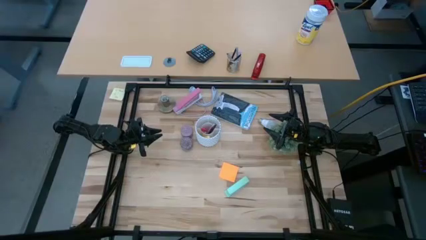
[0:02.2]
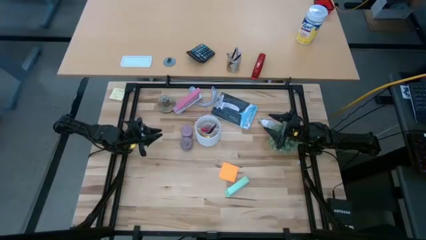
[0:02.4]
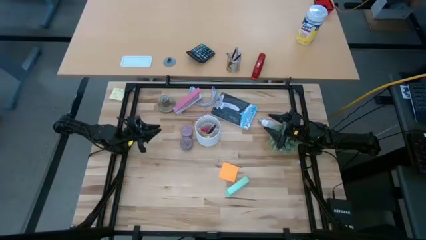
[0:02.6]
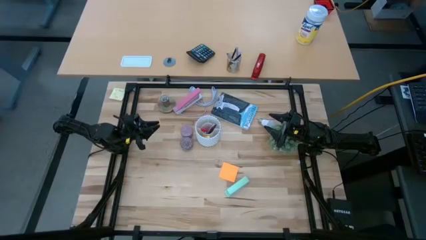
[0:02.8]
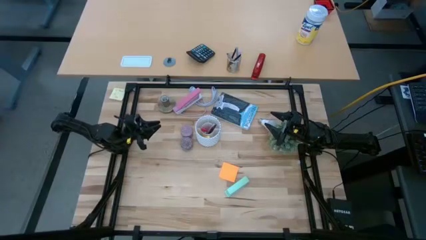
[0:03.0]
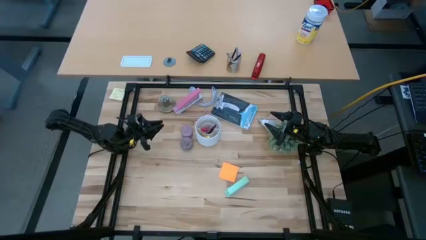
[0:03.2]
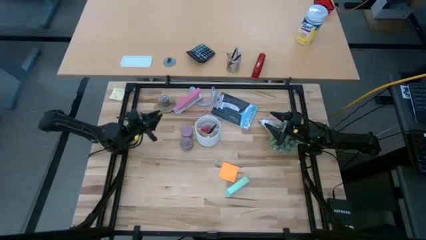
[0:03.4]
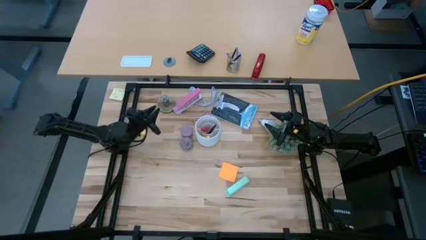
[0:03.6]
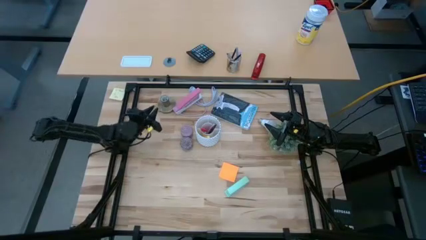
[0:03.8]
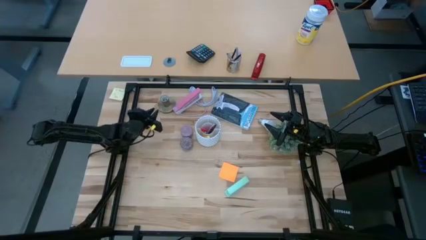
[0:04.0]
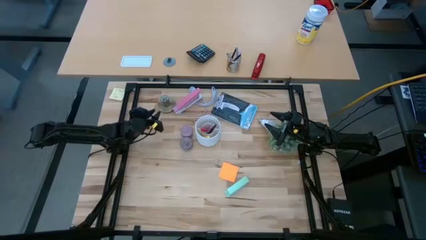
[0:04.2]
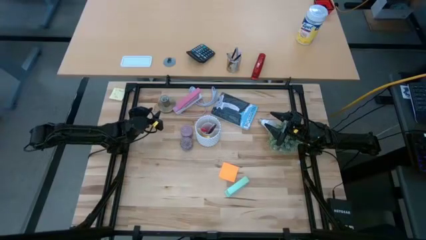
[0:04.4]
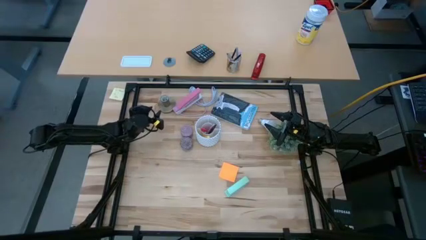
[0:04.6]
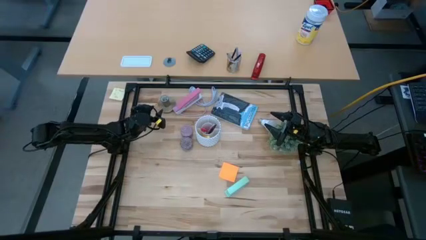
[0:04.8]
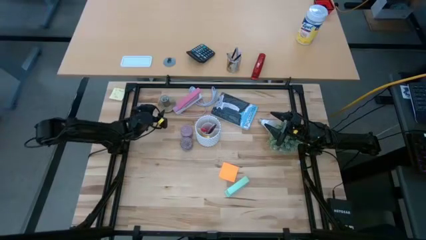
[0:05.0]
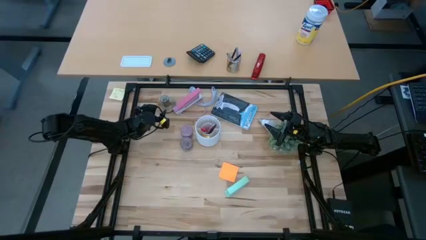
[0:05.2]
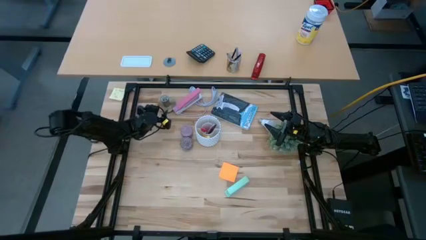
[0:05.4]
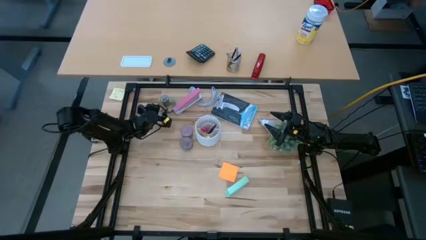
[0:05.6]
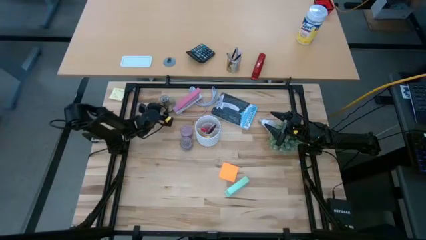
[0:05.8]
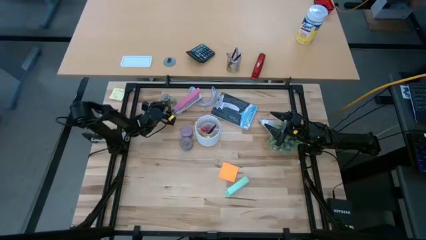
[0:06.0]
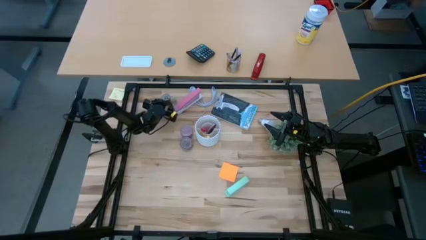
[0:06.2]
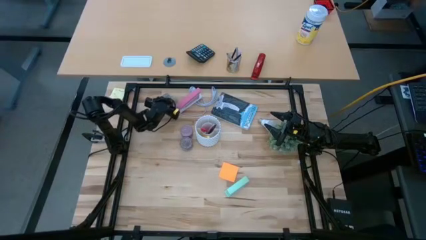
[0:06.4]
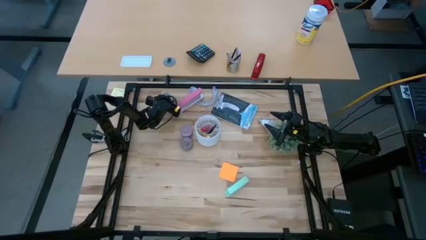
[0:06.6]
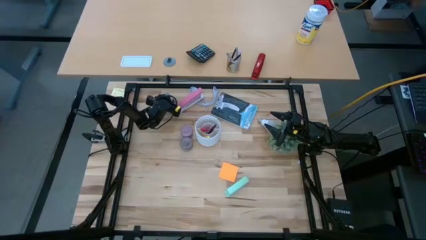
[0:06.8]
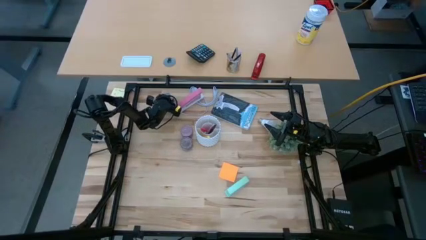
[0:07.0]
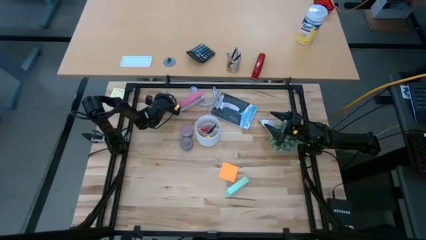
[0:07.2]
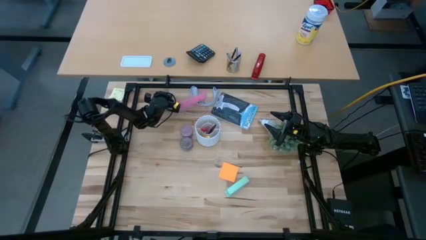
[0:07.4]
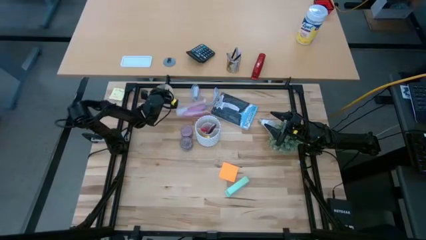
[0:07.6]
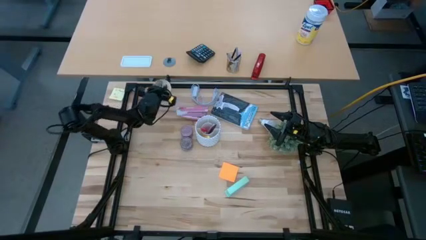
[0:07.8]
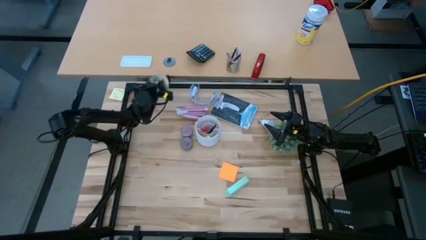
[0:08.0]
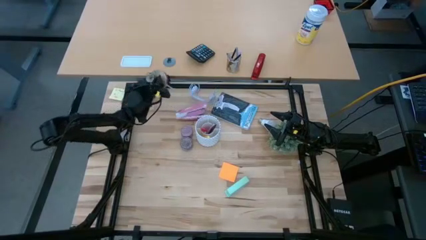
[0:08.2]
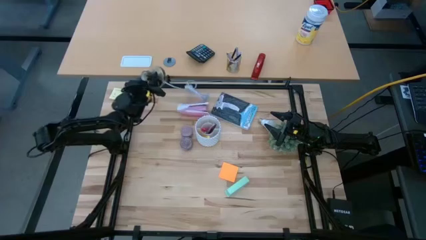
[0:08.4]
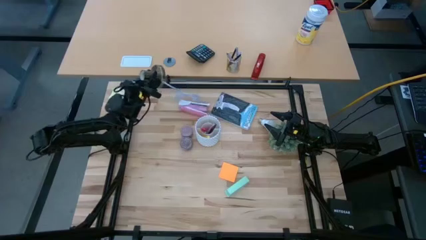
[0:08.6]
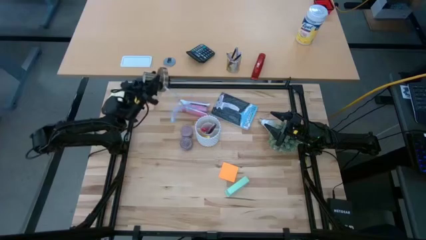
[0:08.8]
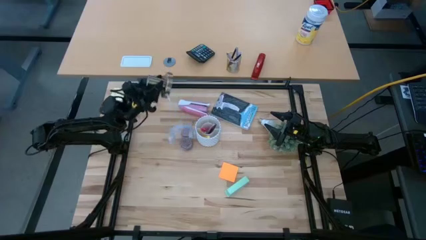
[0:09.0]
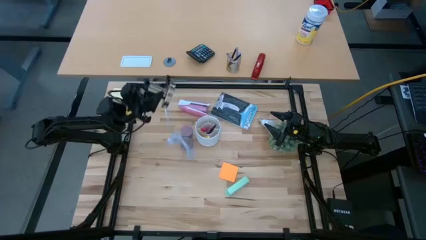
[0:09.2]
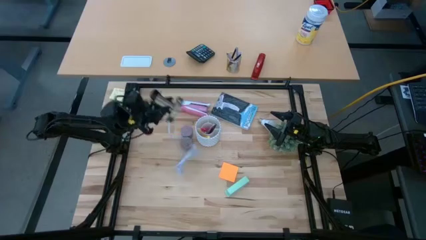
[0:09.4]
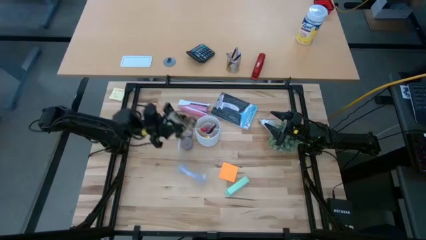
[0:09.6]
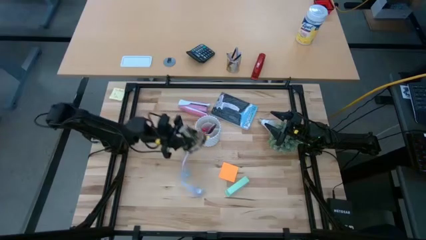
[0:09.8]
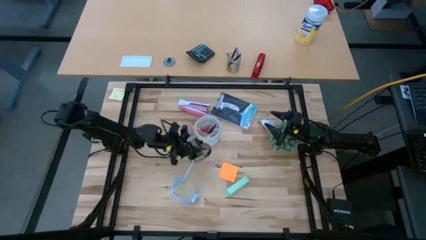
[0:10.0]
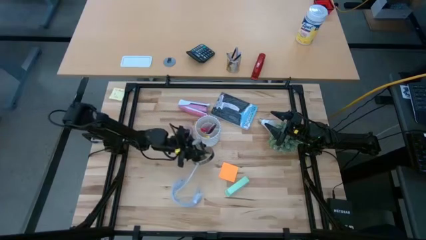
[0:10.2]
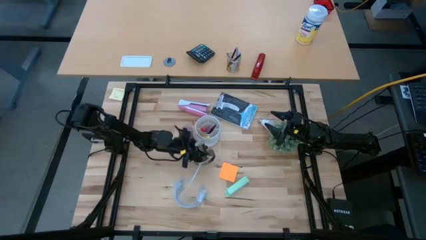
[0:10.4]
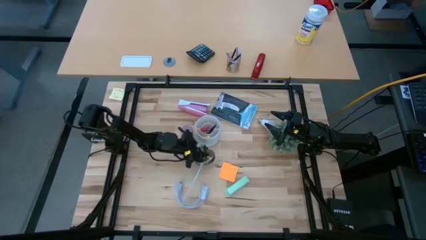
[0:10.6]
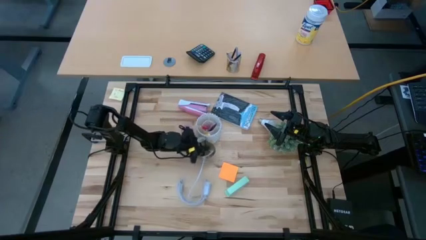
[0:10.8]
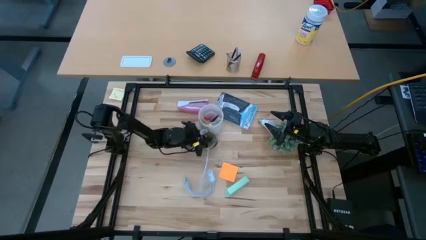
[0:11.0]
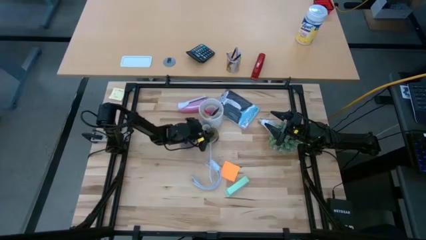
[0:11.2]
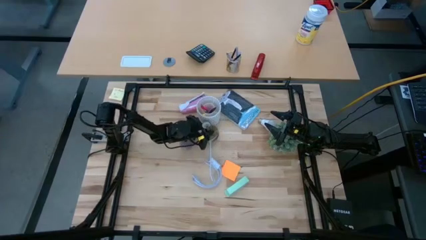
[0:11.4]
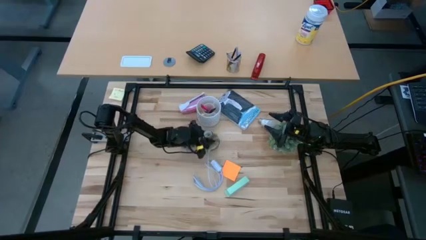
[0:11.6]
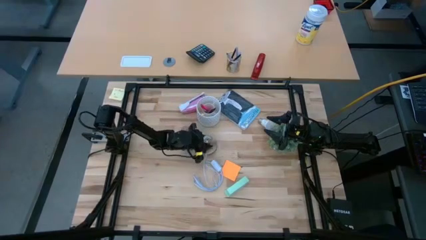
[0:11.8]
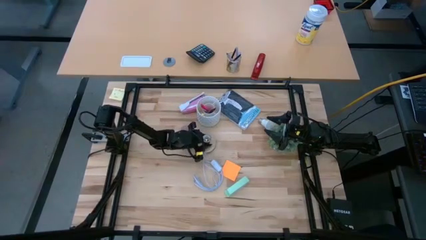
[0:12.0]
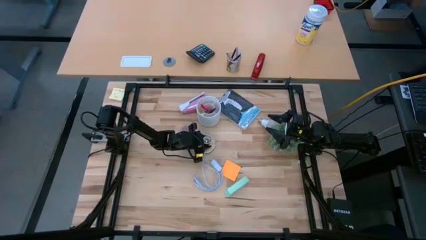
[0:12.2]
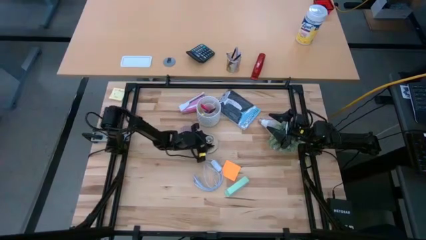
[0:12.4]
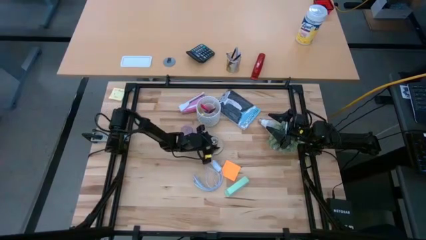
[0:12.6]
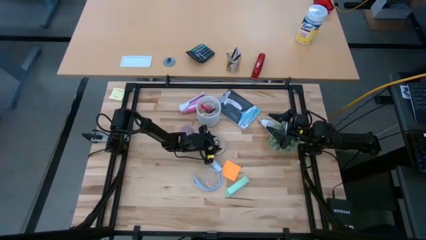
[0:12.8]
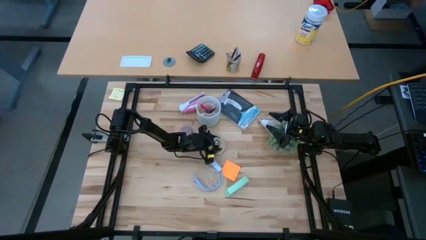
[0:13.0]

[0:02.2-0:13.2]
Task: Screw lightbulb
Move the lamp to the center of the table

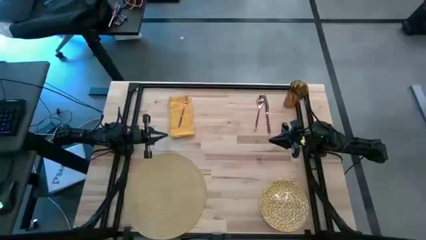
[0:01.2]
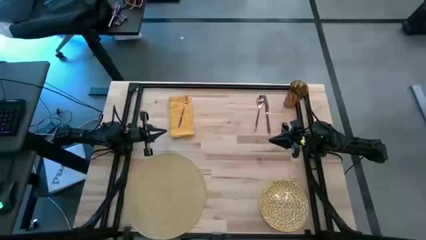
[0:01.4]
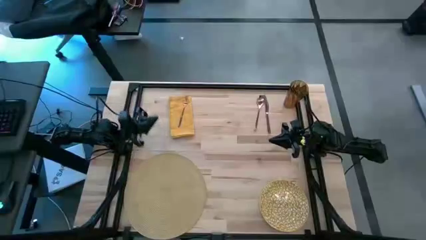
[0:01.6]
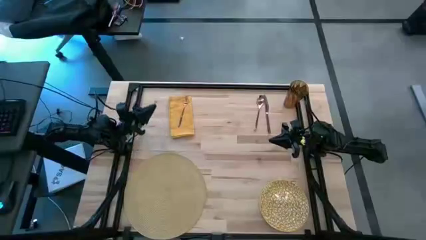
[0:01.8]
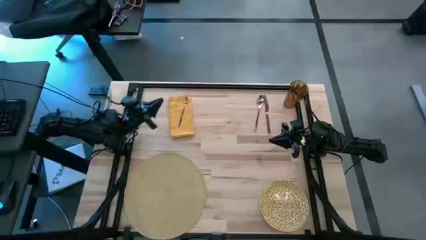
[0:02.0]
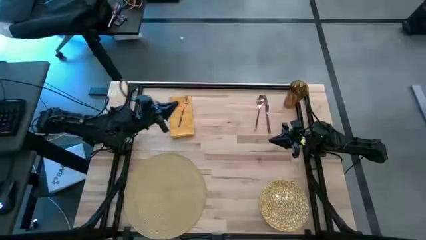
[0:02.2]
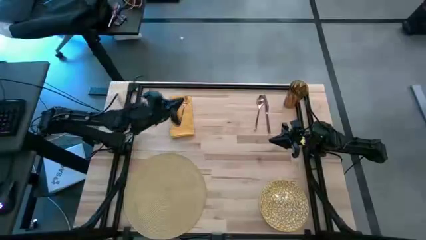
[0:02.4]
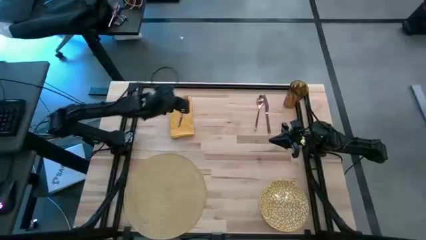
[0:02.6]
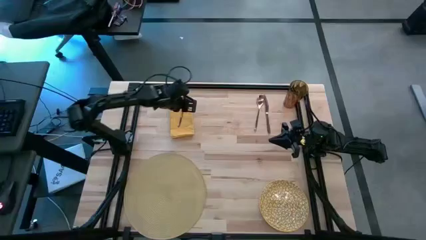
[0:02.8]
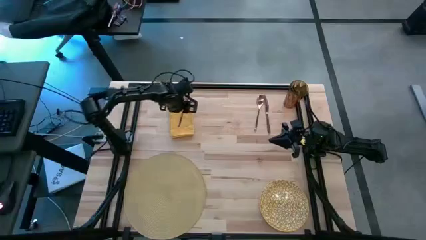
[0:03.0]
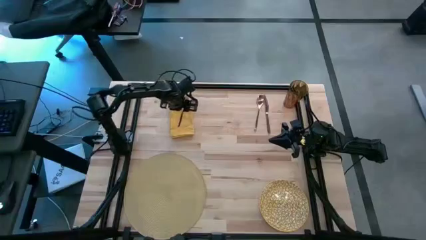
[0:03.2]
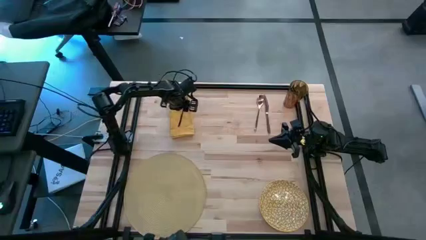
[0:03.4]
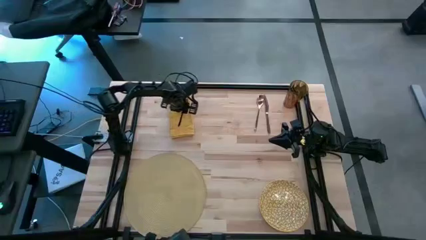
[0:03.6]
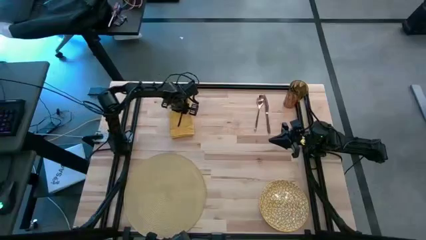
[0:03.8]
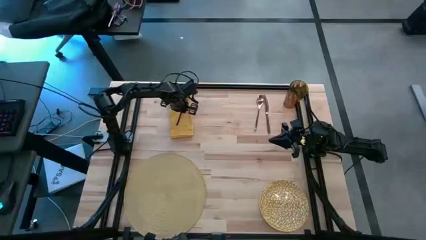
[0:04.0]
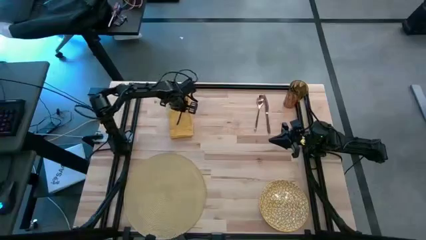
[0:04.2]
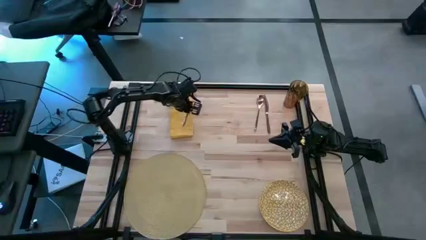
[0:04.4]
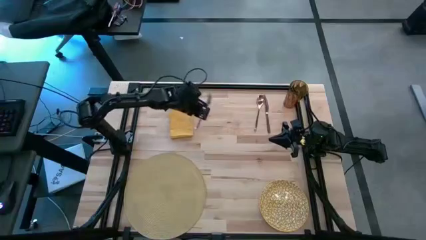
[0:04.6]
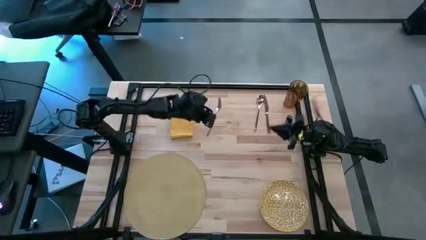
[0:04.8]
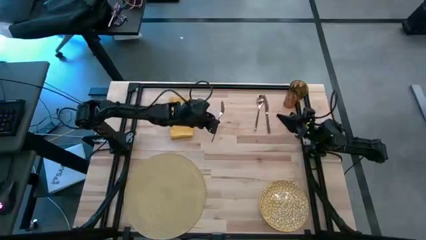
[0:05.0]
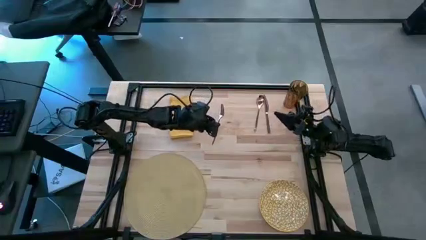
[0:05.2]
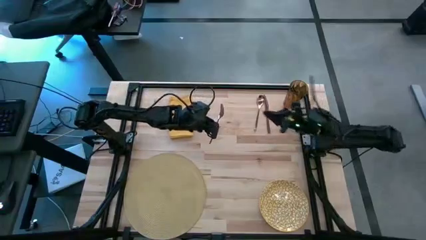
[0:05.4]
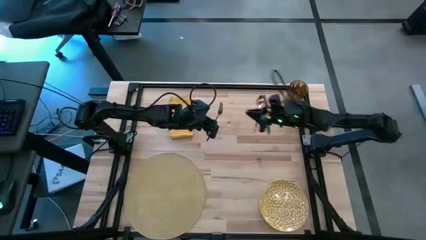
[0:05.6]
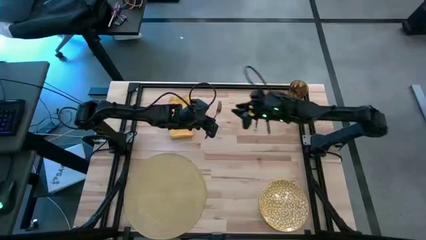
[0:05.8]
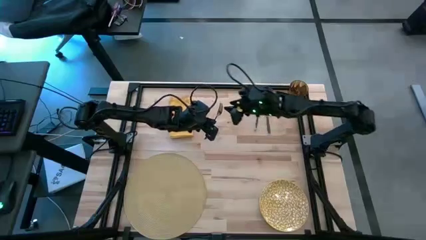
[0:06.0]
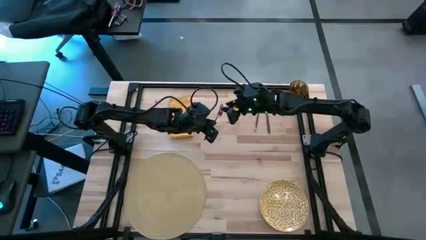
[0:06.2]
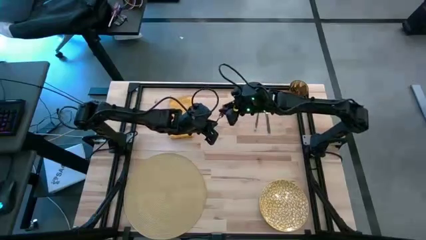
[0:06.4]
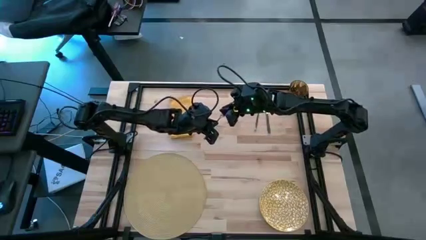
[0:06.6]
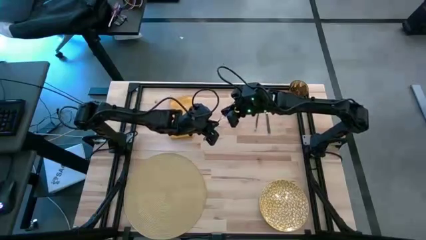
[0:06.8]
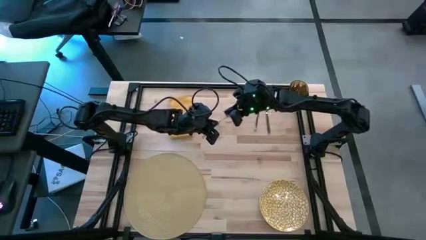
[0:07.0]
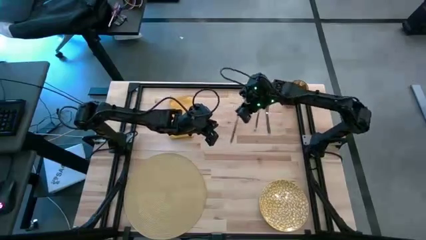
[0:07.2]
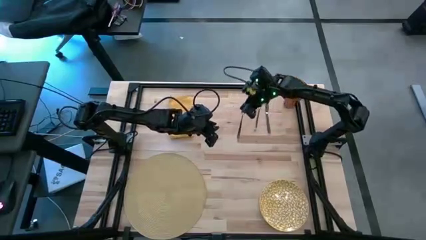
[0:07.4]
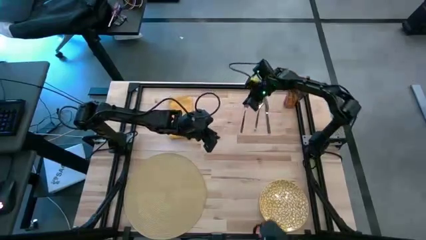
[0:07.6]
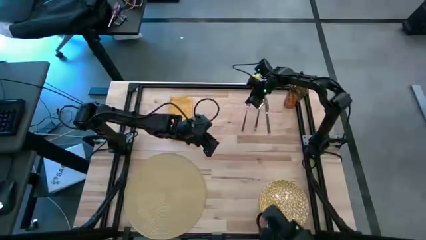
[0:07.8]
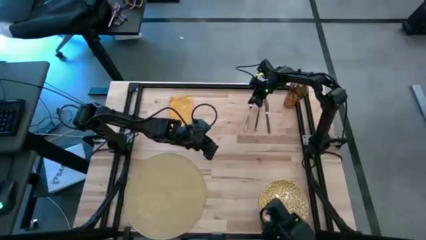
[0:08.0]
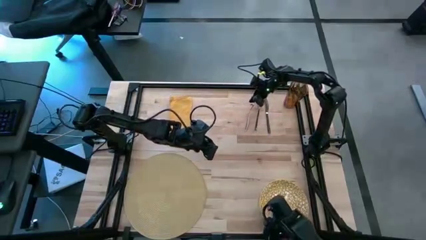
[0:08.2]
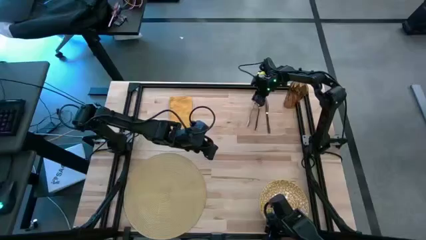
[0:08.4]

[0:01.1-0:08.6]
Task: Set table place
Move the brown fork to the top left of the table
